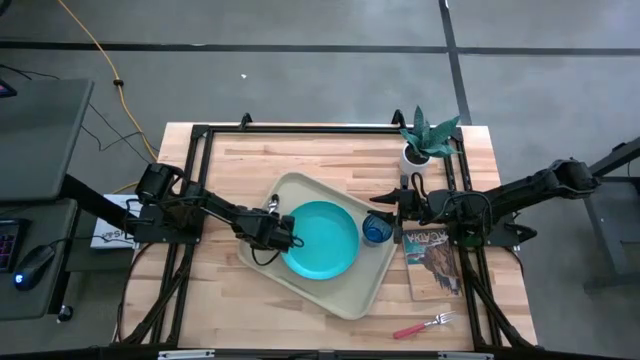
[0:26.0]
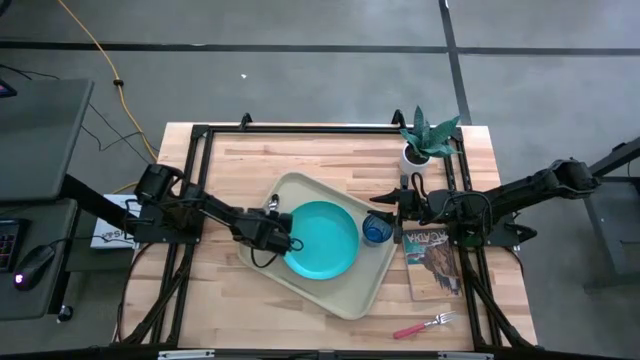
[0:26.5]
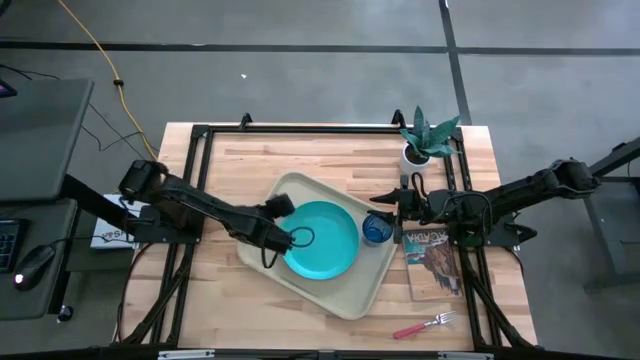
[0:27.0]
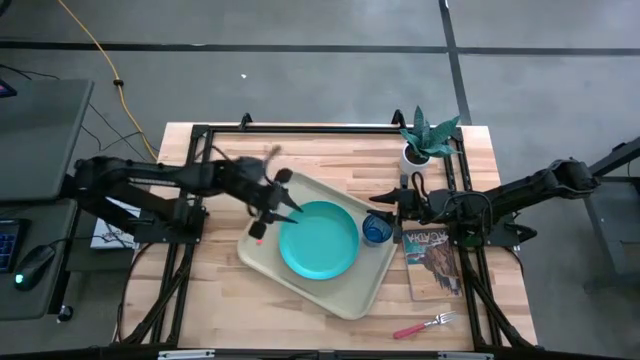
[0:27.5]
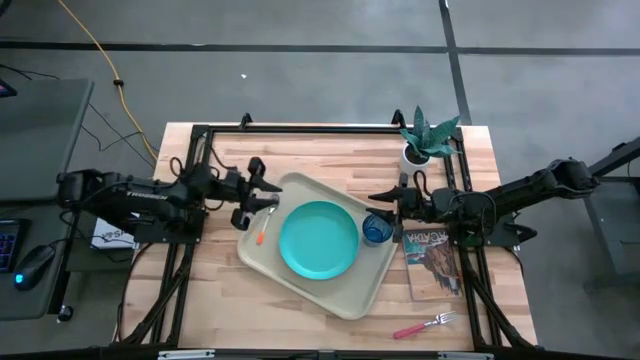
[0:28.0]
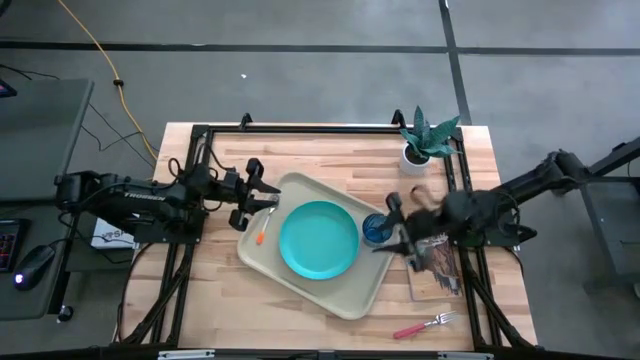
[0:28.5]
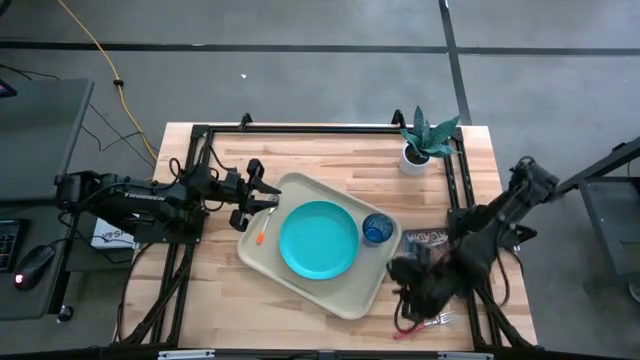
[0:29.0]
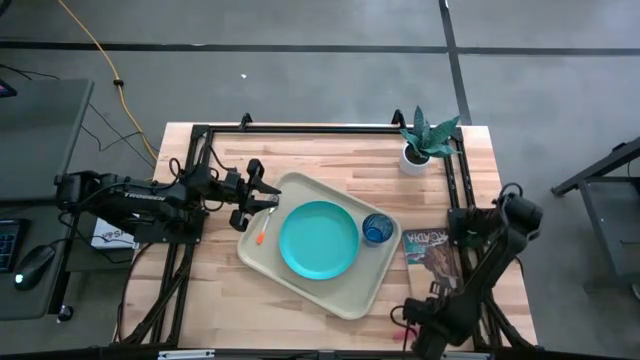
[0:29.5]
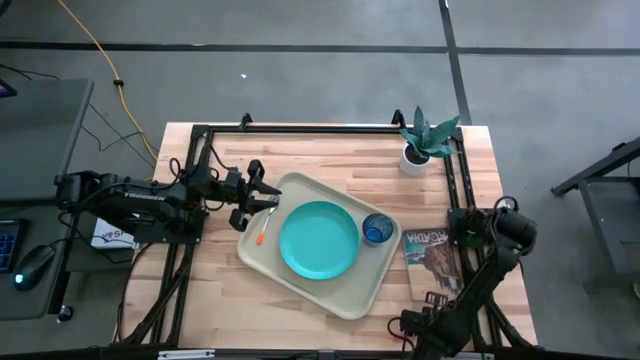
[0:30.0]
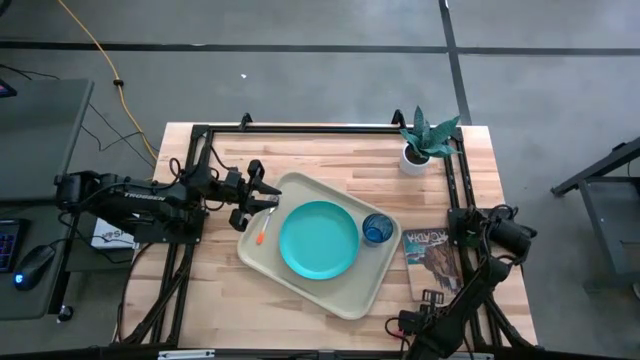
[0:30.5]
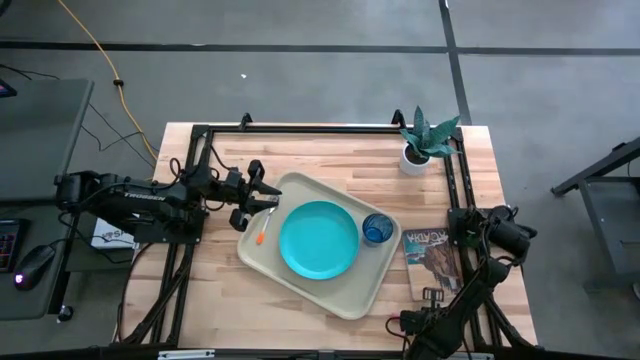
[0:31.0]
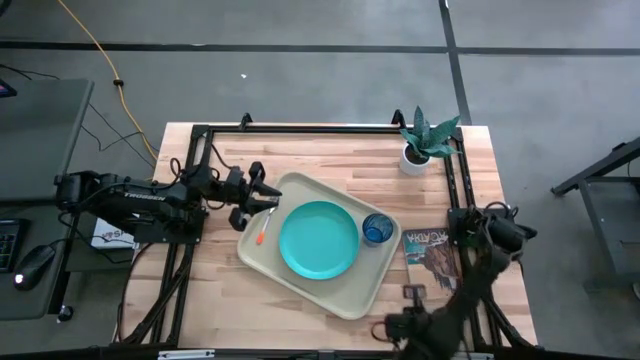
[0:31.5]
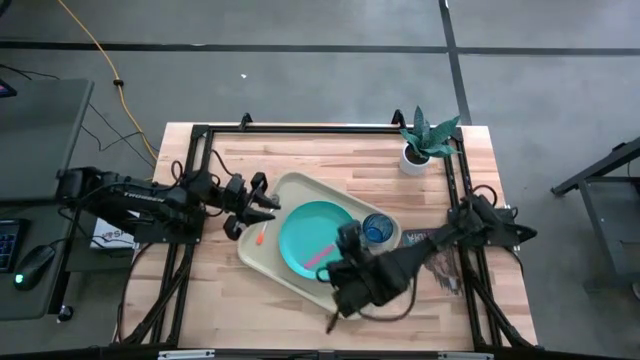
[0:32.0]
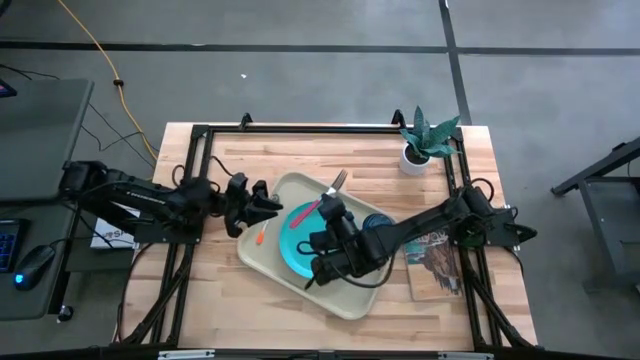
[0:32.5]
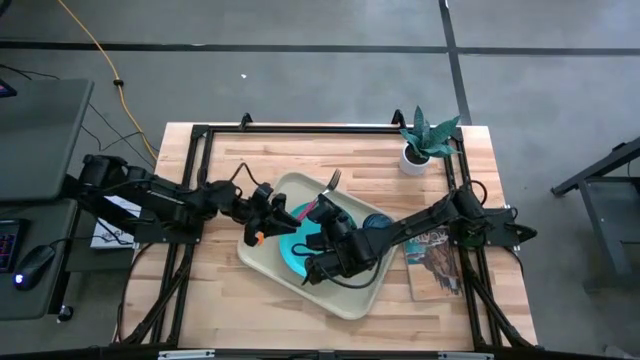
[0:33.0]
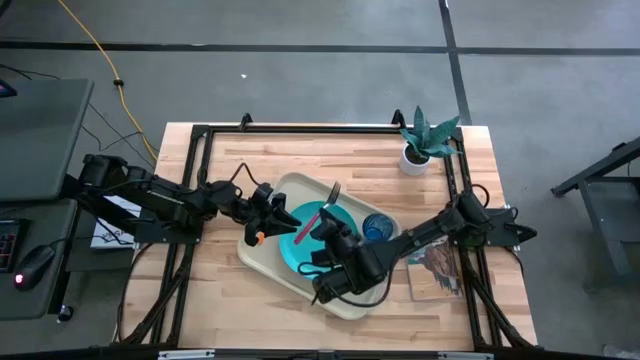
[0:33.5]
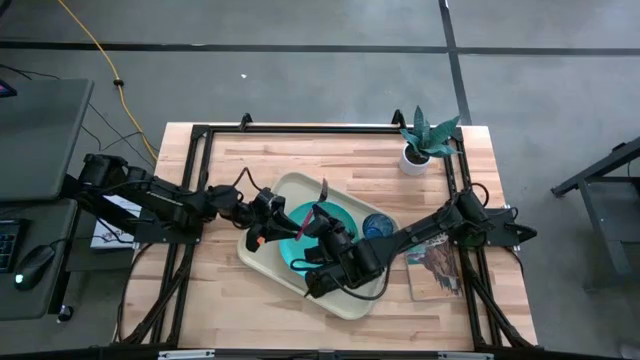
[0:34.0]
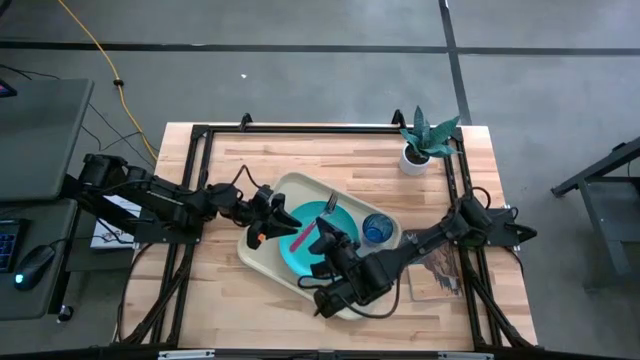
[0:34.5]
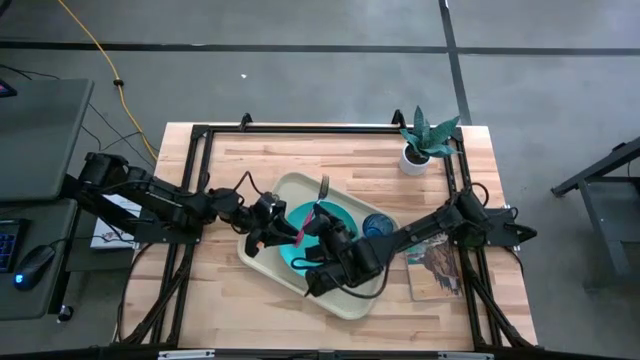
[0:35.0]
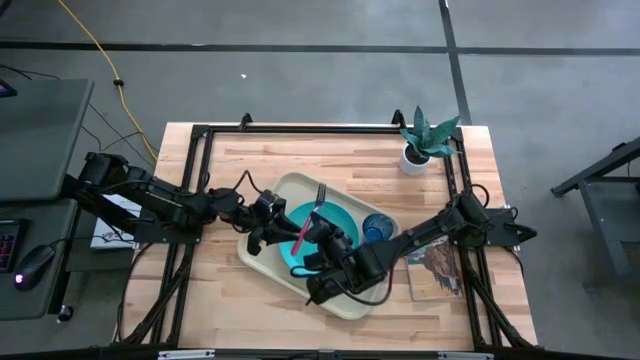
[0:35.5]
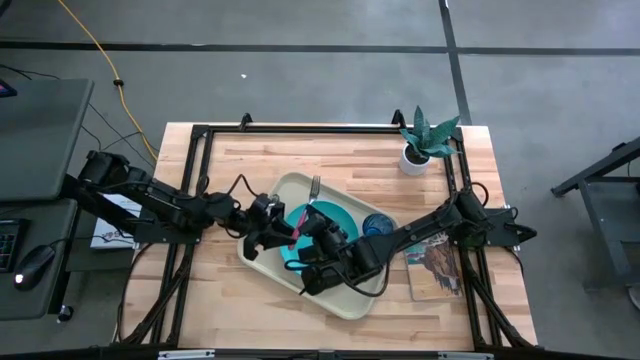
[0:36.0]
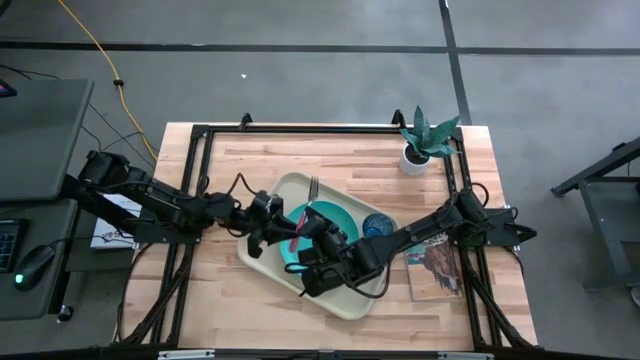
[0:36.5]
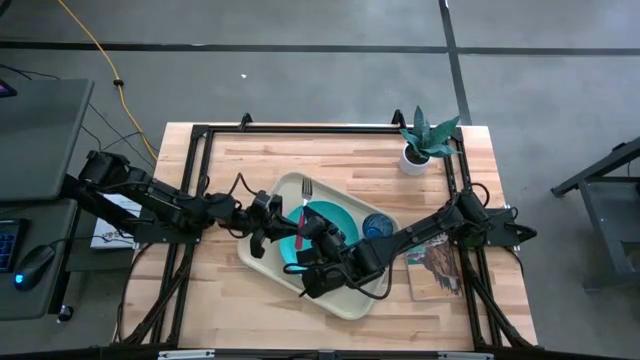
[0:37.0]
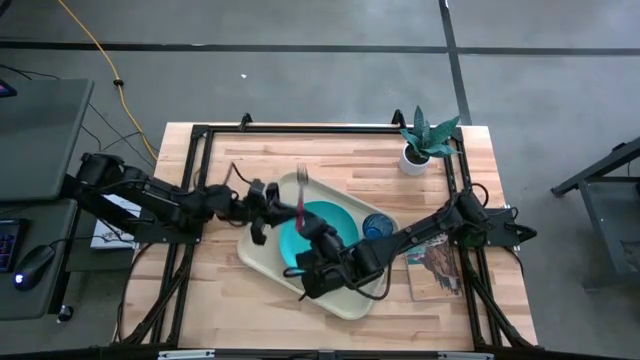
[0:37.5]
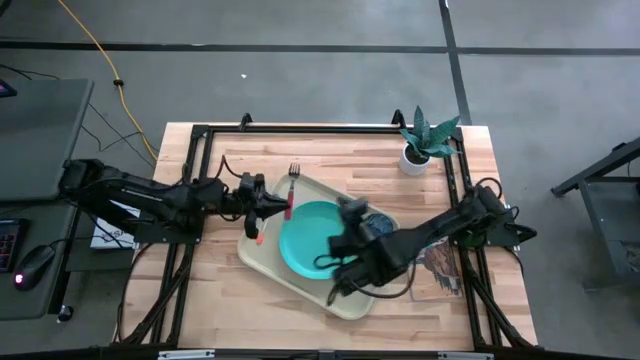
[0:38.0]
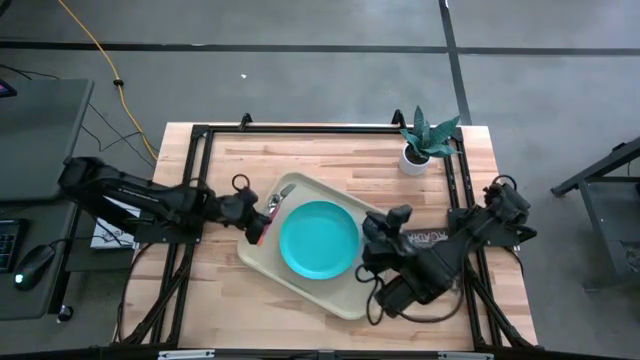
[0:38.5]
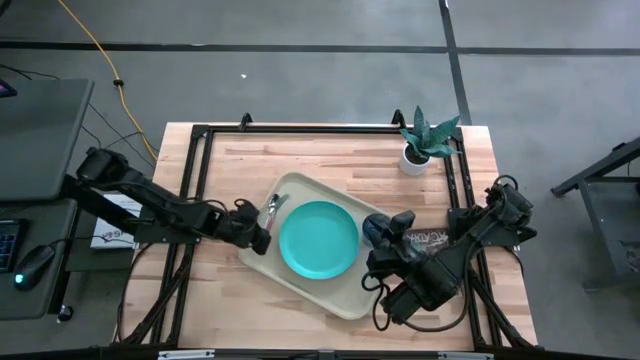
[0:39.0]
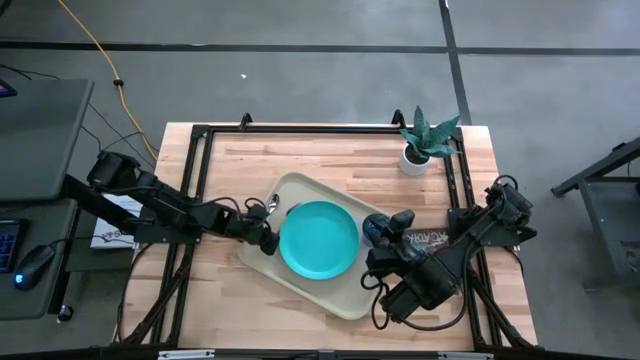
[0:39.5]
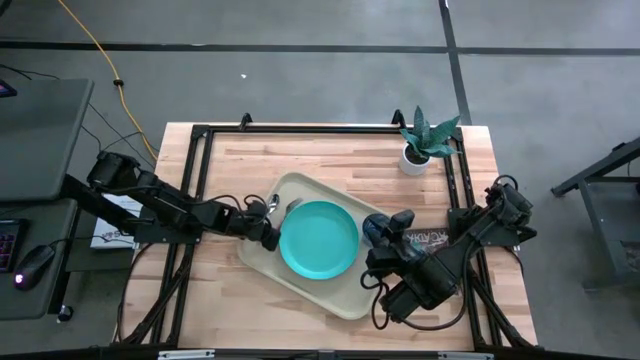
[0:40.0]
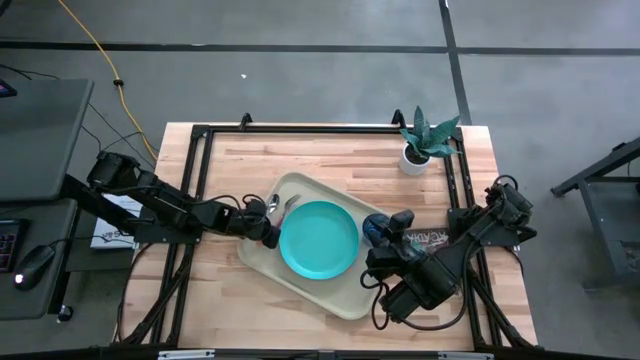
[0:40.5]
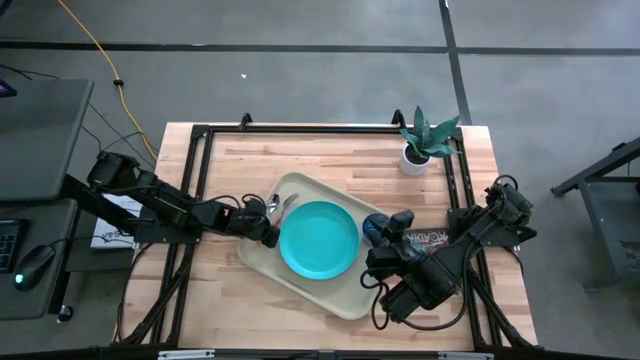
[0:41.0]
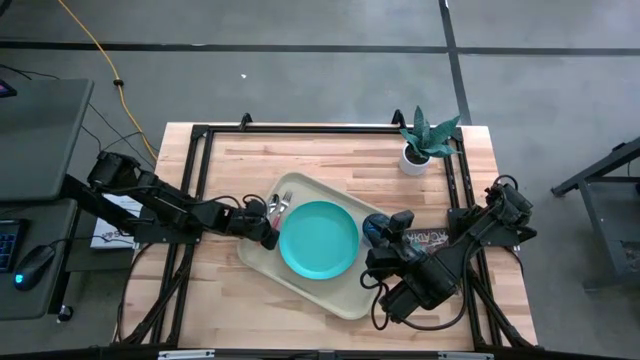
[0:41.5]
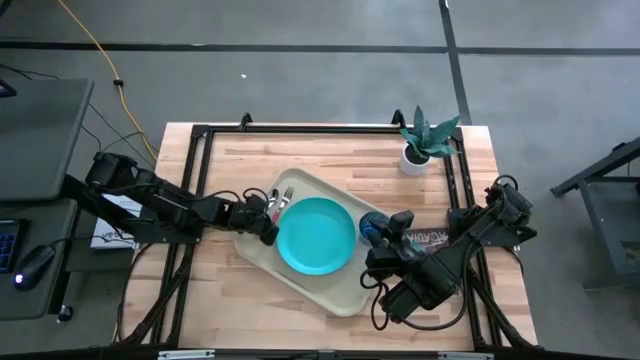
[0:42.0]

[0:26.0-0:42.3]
Task: Pick and place plate/cup/fork/spoon on tray
Put the pink fork on the gray serving tray between the orange spoon and blue plate

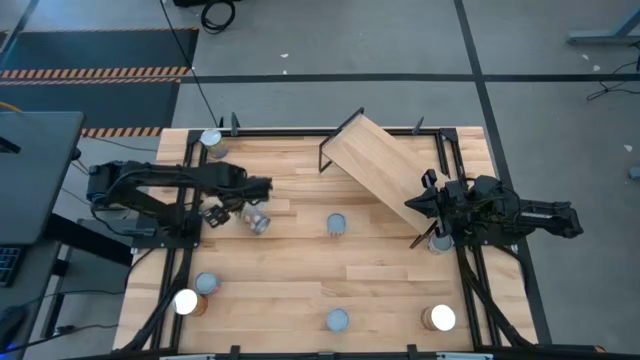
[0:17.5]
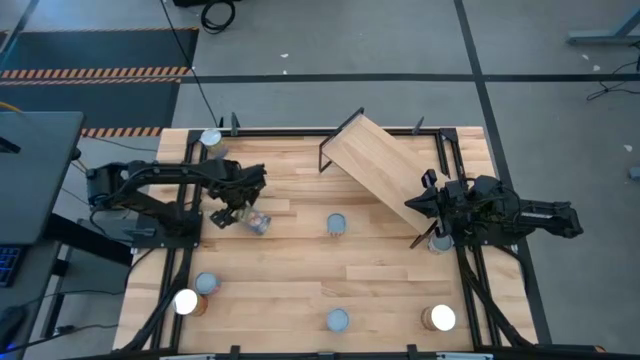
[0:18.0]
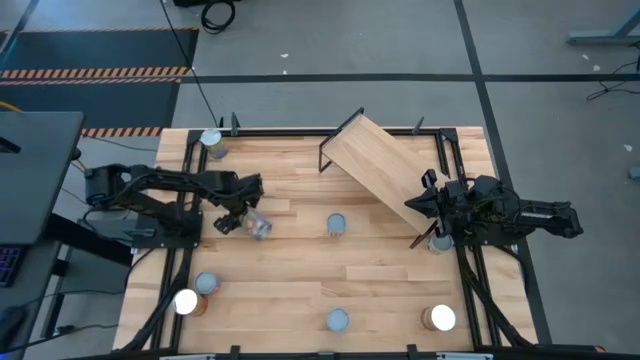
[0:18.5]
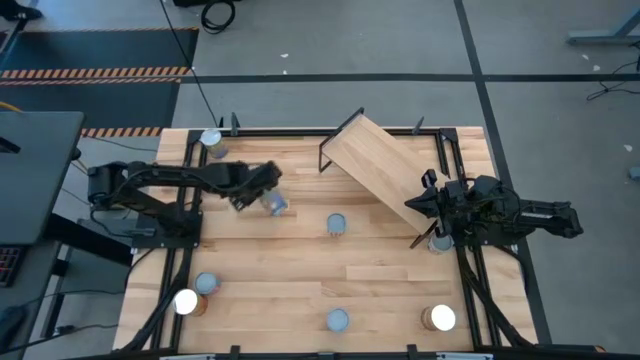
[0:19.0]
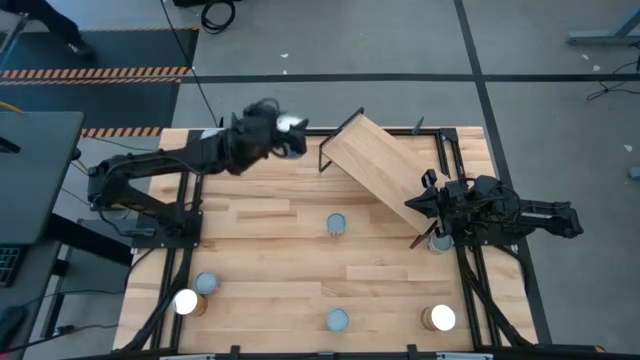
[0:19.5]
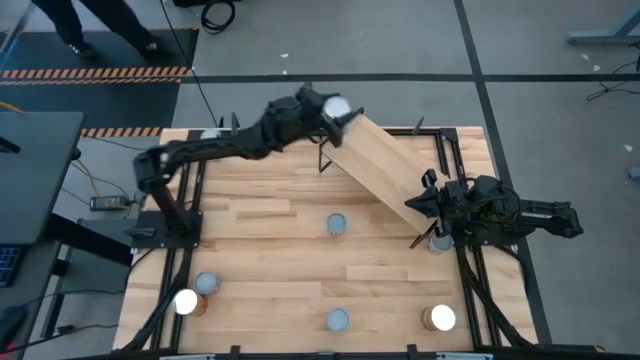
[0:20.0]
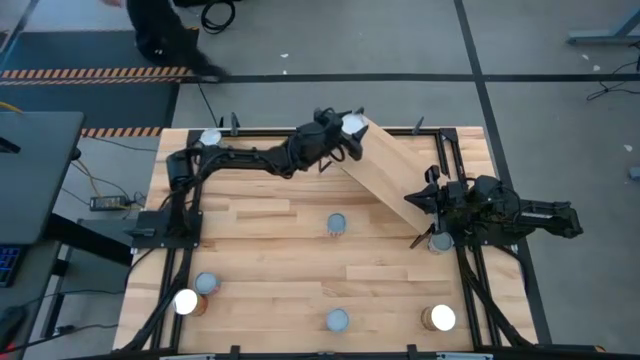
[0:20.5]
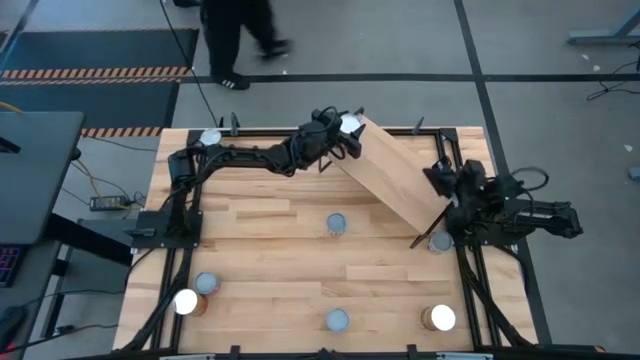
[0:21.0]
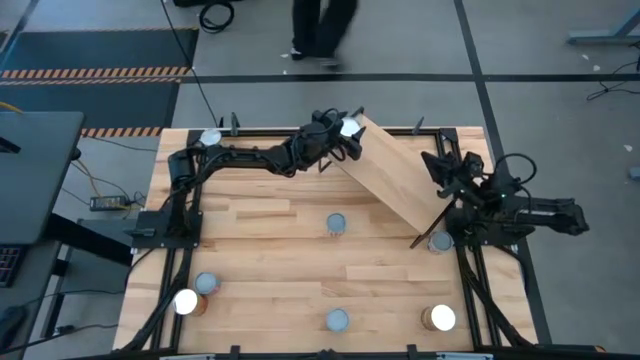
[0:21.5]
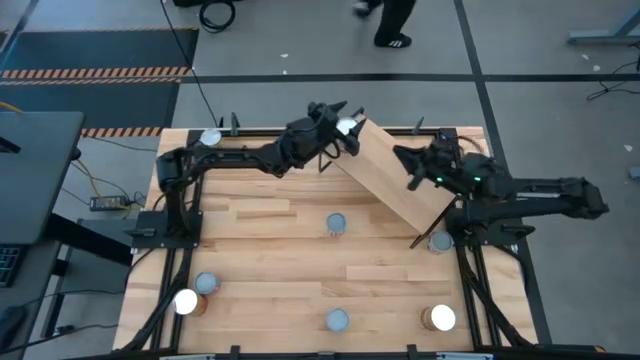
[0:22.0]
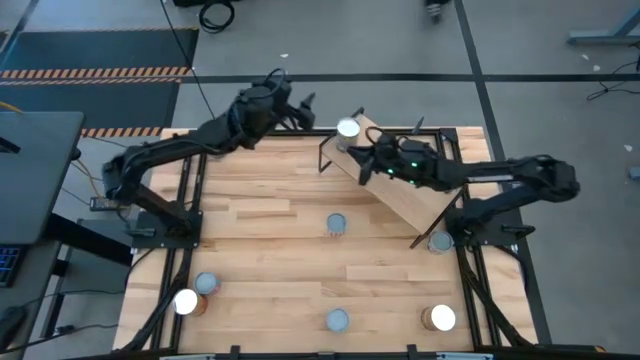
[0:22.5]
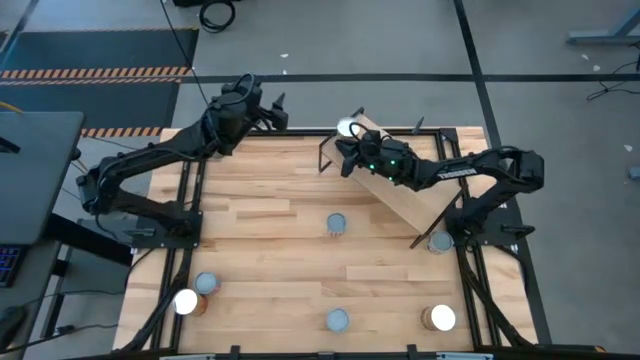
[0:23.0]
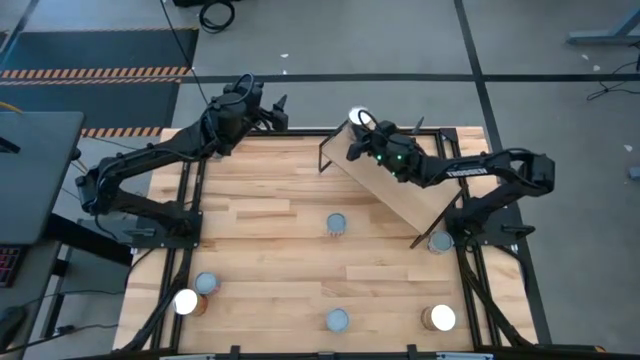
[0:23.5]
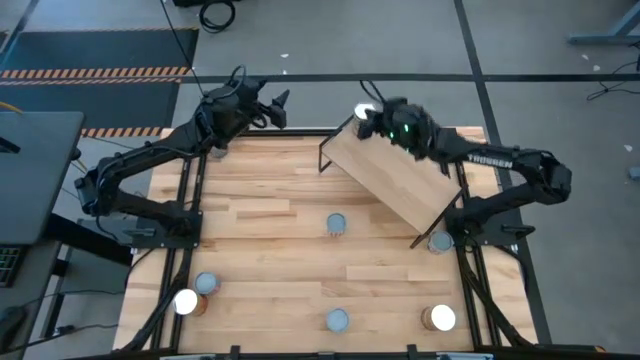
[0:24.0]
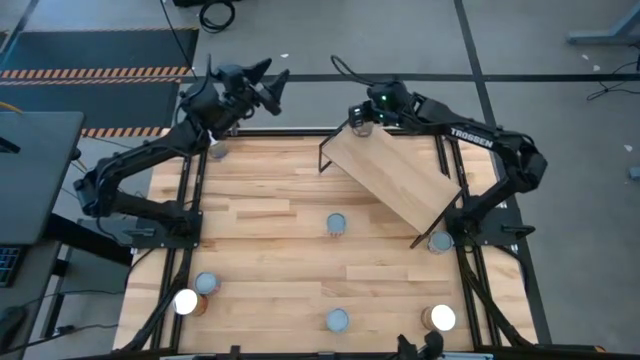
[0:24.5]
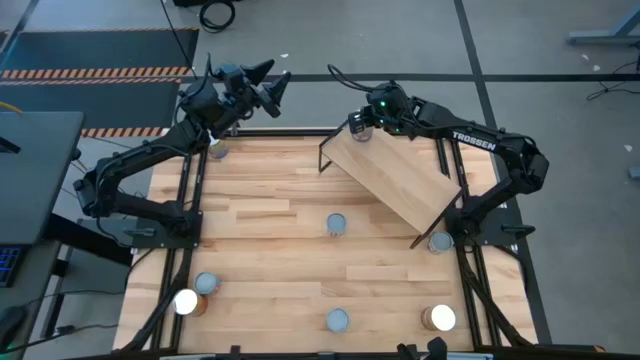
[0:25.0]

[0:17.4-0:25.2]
Task: Pick and place cans onto a shelf
Put the bottom canned peaches can on the shelf
